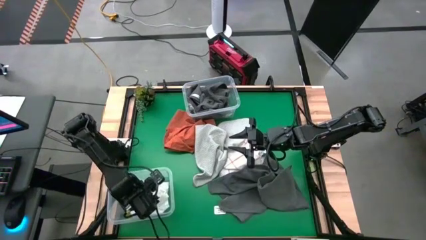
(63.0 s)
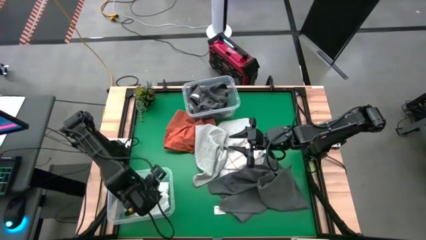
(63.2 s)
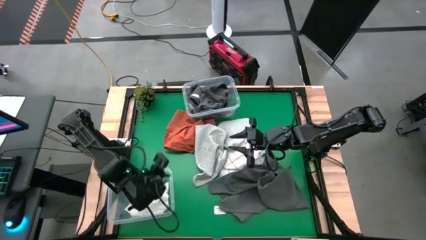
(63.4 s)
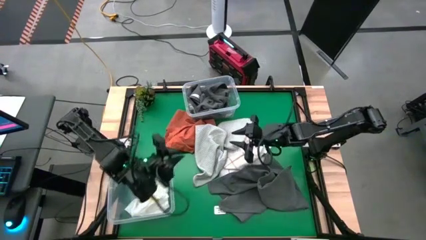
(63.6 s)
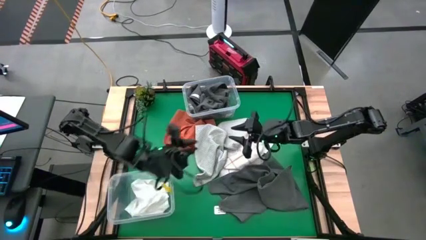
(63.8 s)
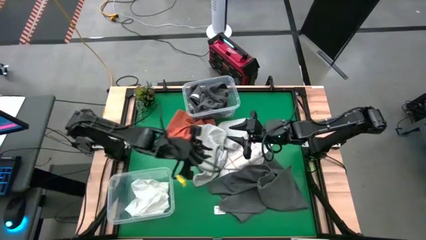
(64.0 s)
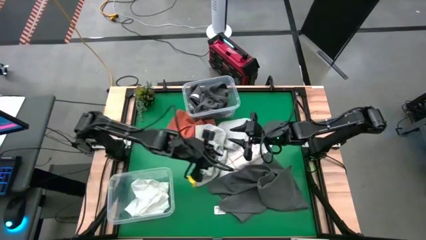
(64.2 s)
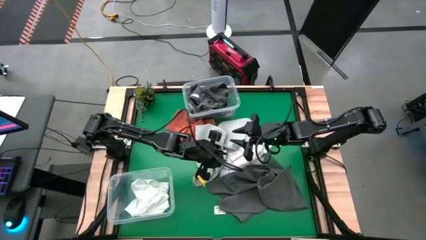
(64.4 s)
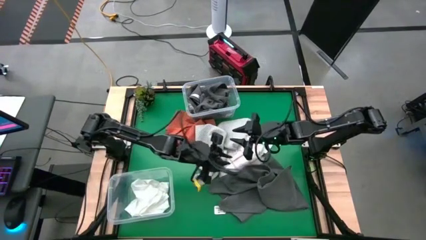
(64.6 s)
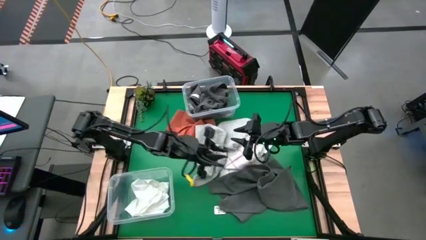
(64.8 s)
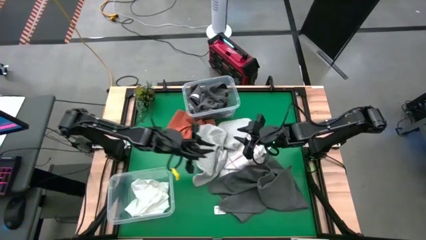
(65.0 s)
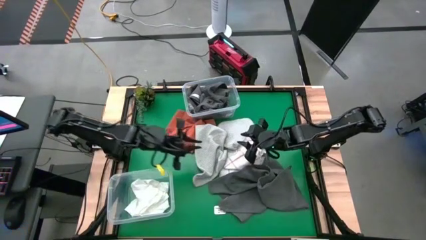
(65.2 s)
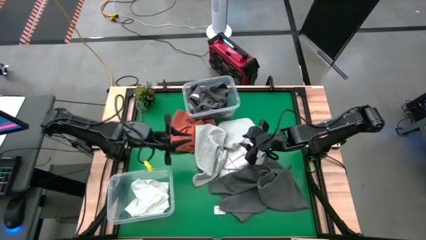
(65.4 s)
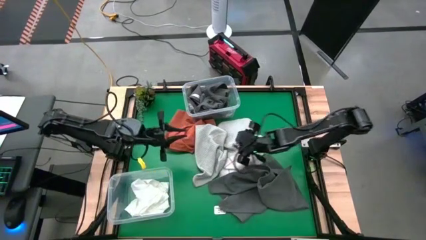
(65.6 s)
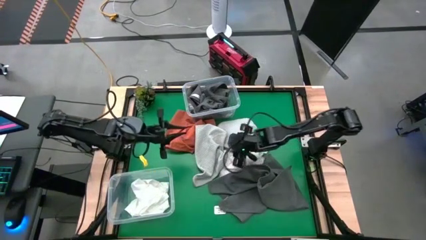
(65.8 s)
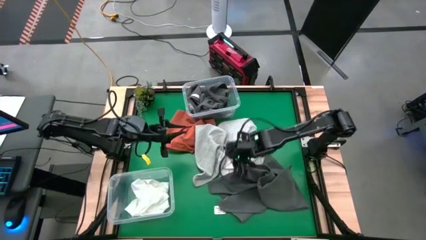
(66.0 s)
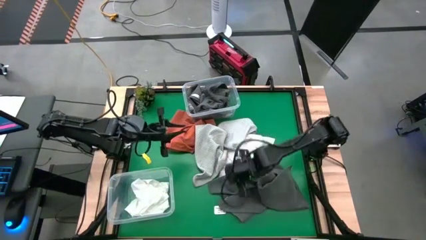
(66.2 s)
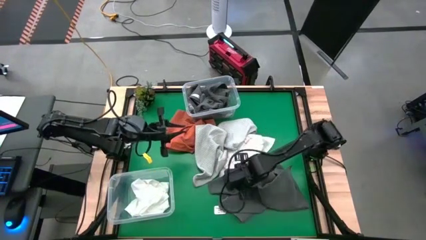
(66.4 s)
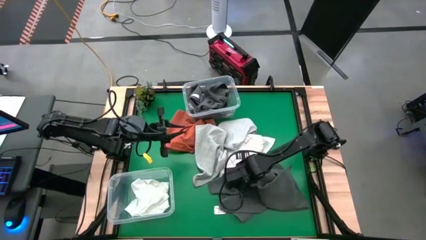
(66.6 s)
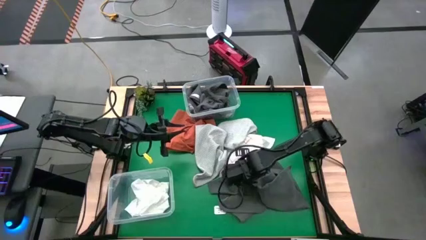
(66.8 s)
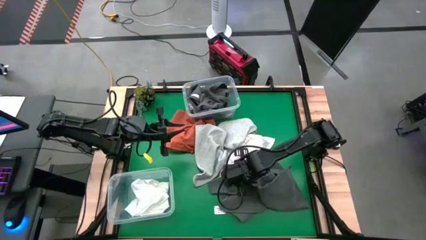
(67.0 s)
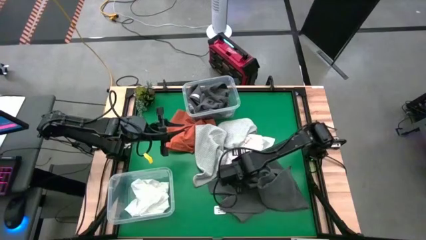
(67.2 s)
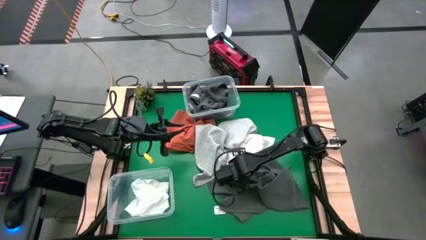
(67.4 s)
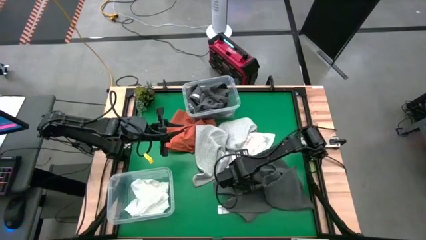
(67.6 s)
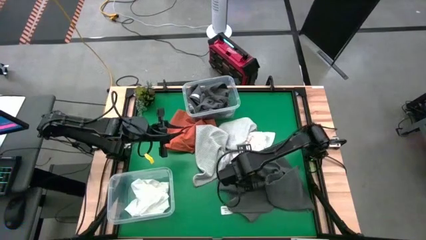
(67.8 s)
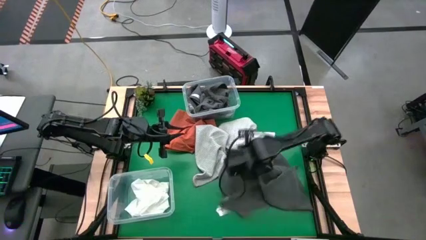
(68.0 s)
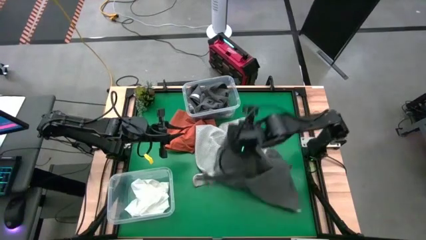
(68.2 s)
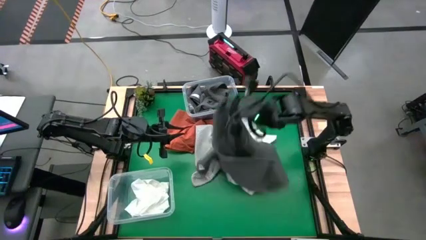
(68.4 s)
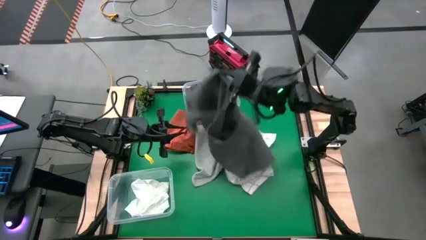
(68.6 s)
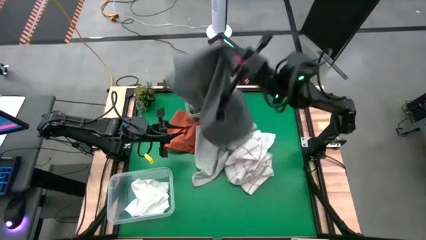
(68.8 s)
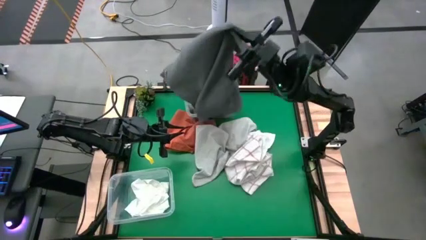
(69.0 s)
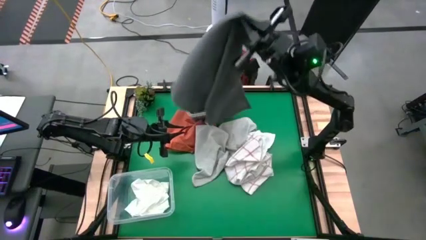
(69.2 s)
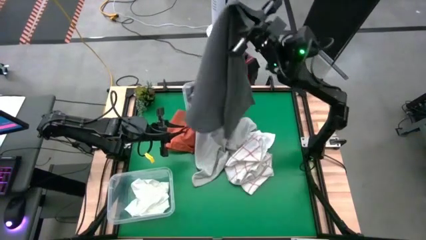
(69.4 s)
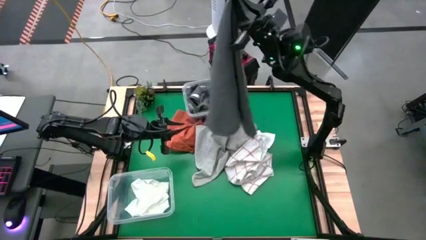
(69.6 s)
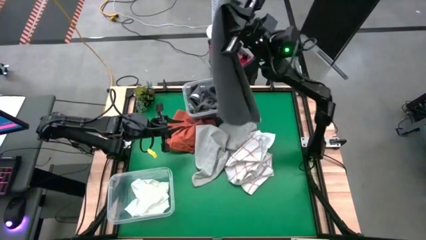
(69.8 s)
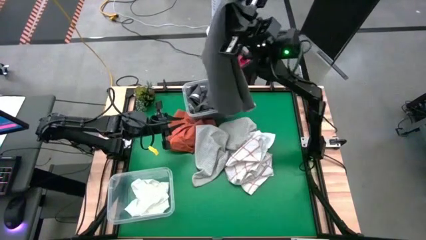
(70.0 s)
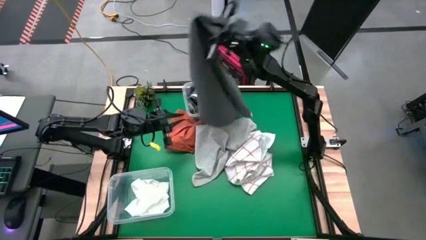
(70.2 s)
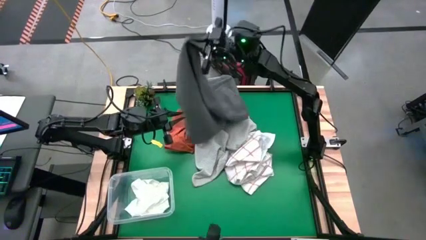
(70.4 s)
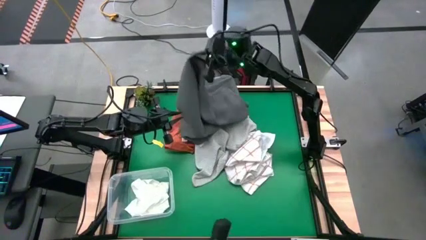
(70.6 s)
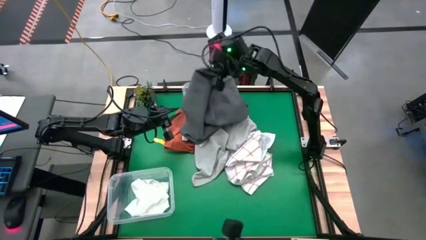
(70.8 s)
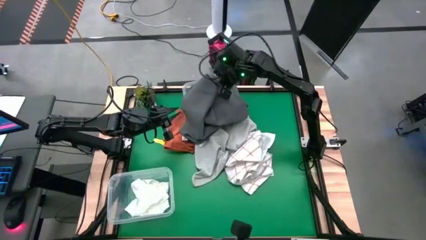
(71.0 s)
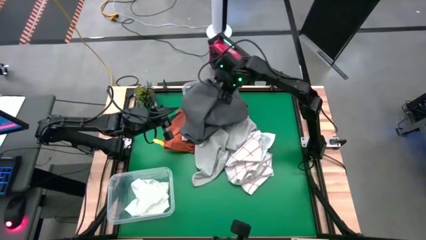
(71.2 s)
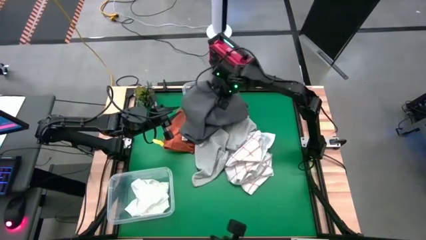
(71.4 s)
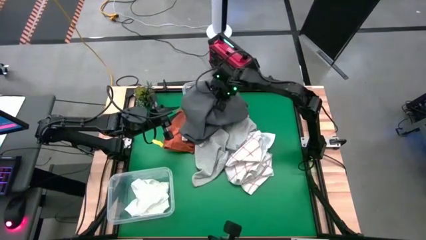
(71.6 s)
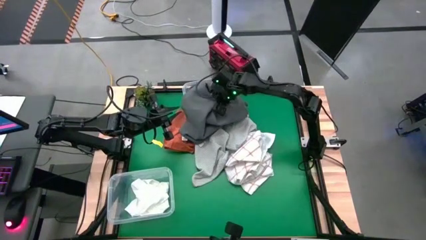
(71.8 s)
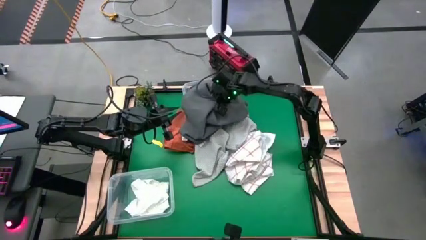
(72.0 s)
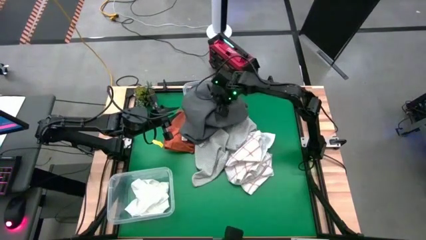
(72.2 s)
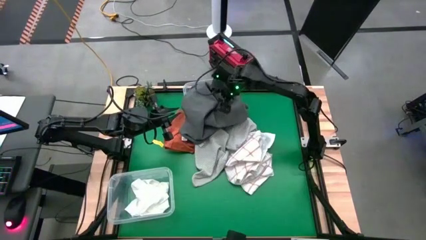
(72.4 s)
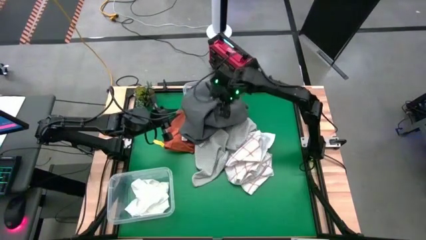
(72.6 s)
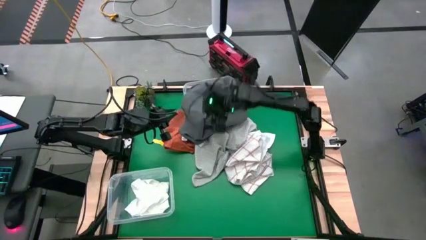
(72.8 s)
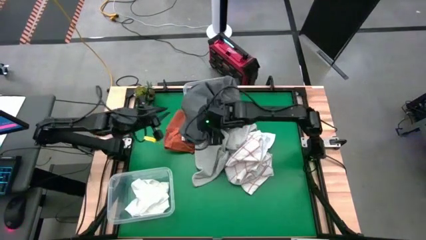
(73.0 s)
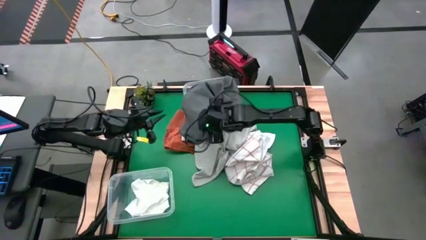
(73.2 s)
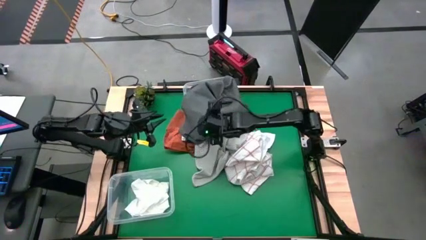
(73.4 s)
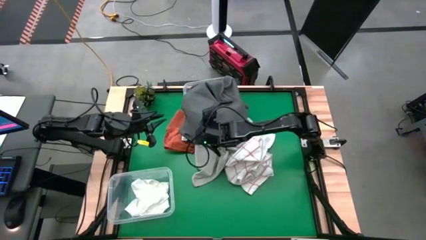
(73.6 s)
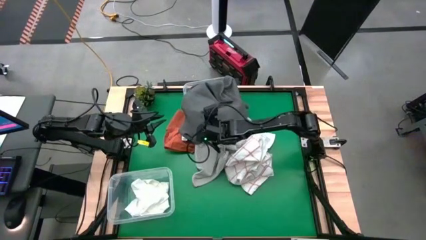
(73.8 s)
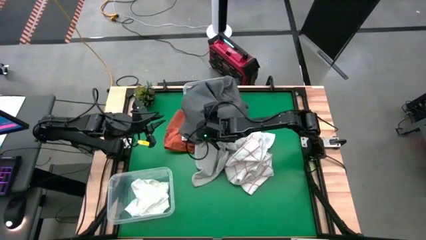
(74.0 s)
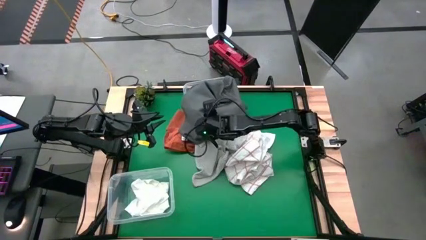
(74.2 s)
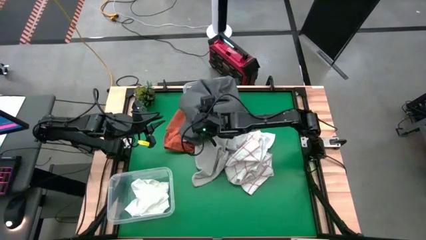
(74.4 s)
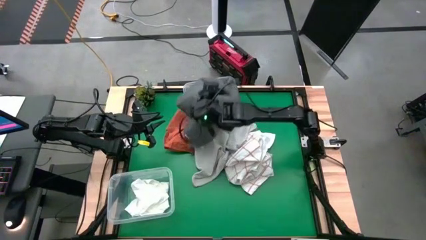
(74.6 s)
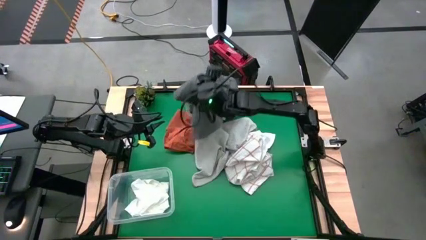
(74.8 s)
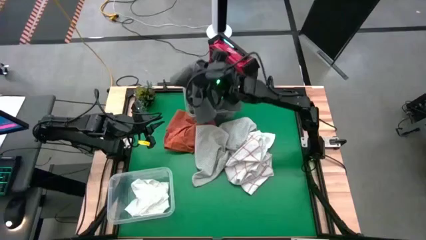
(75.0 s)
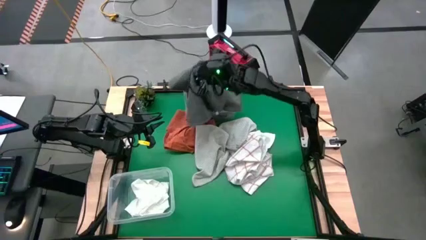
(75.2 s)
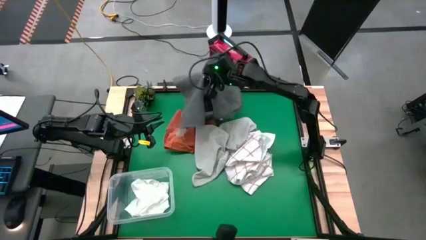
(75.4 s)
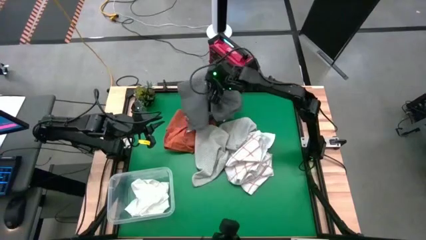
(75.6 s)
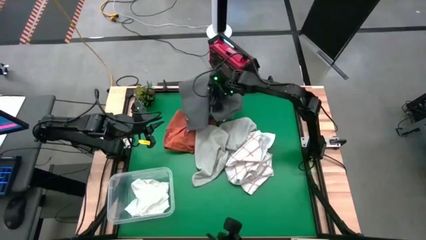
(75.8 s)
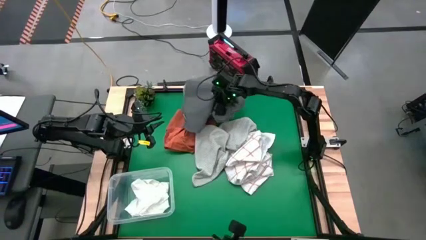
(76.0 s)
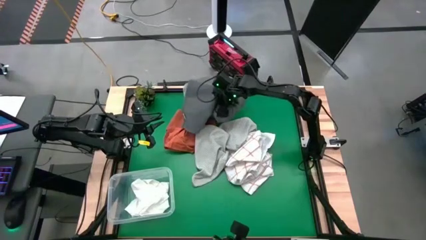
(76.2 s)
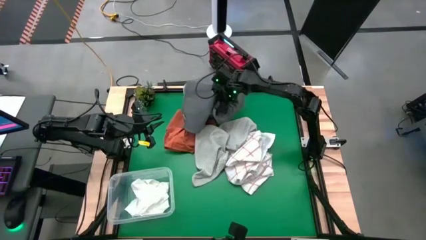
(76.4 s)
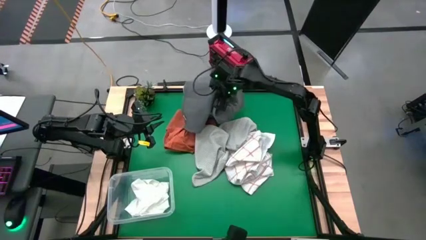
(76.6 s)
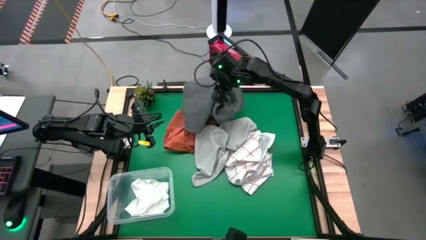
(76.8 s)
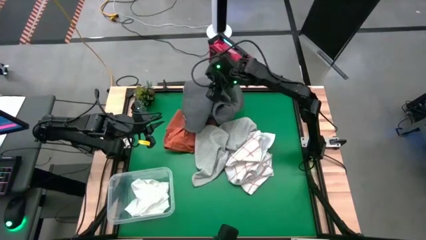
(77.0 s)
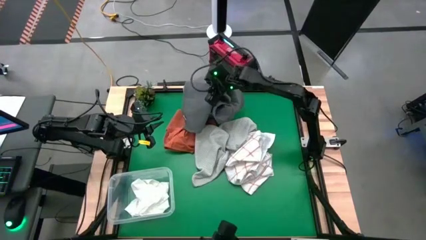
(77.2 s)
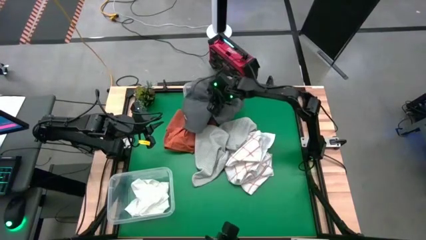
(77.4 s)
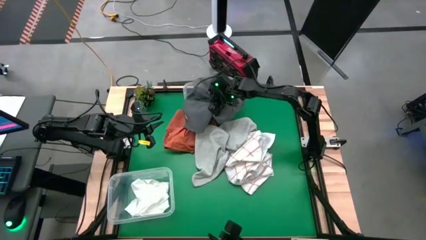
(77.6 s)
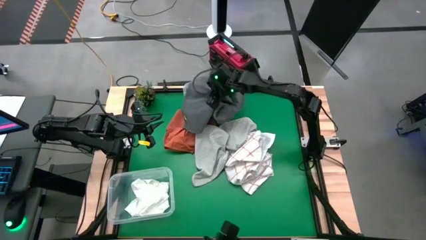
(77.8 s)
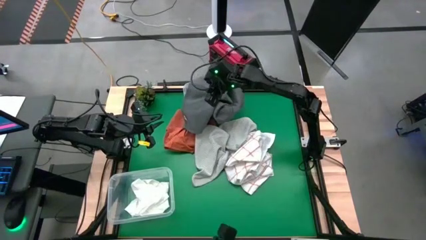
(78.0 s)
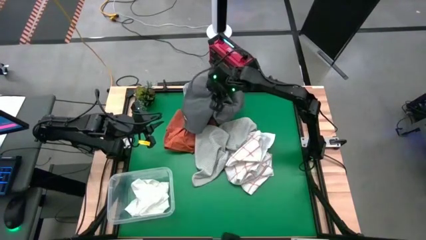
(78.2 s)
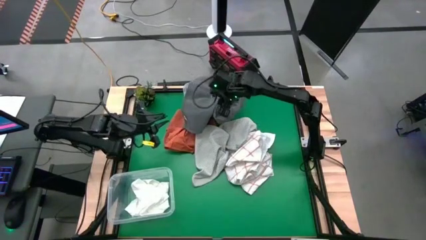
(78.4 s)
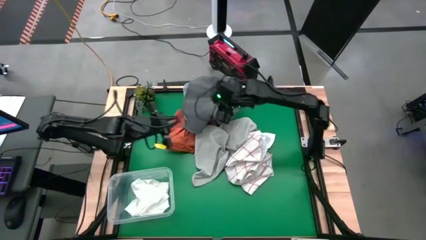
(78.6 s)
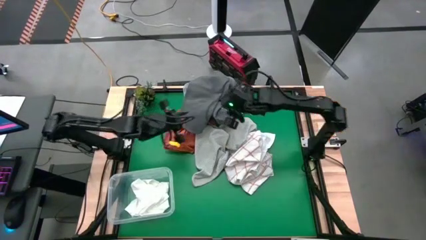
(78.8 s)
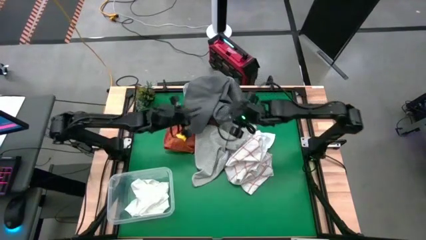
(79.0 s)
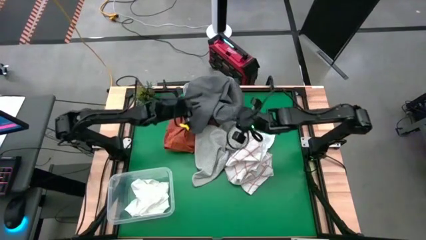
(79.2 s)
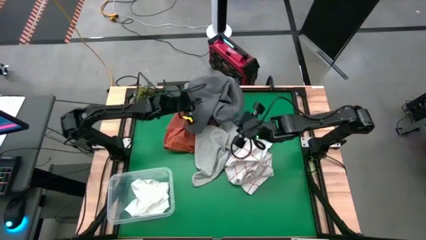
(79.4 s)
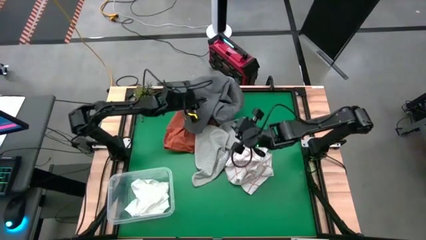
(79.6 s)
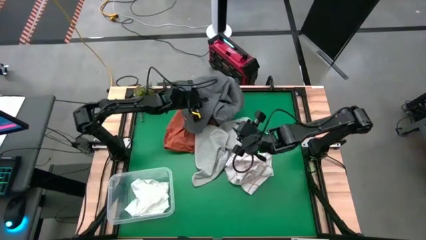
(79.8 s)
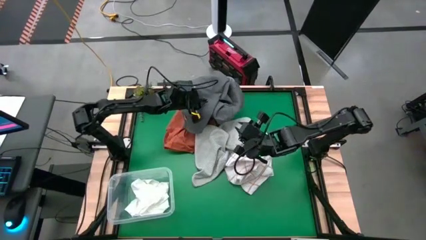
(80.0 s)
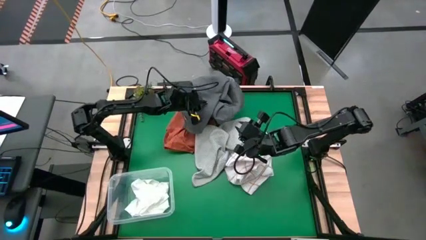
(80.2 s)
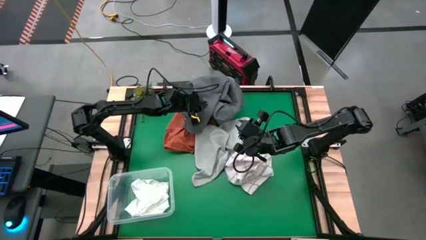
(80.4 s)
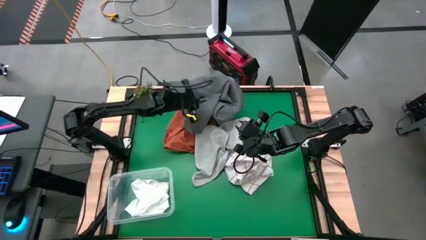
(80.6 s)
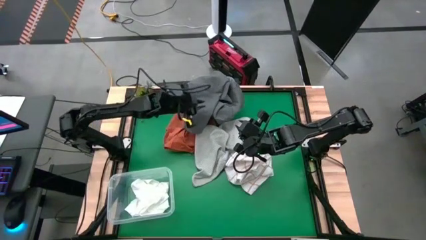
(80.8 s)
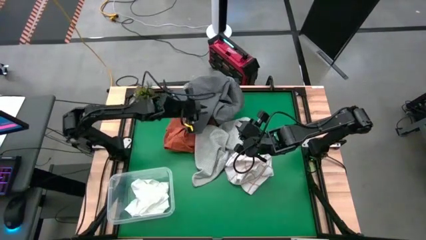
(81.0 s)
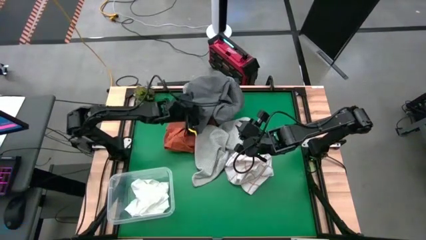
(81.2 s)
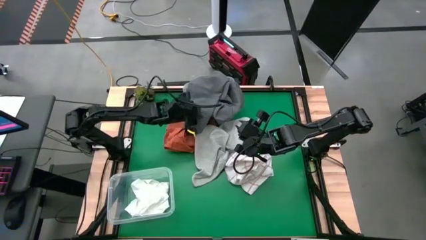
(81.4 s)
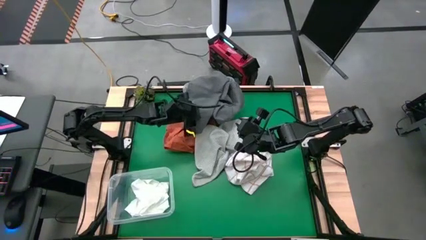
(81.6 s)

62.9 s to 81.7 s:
Task: Sort towels by color in basket
Put the gray towel into the top transparent bin
